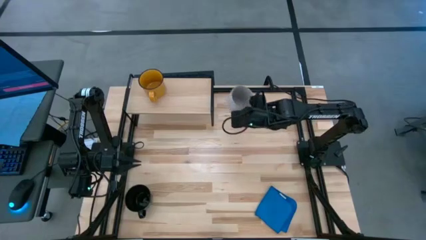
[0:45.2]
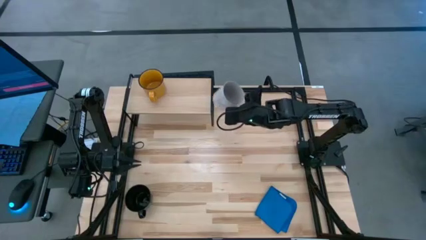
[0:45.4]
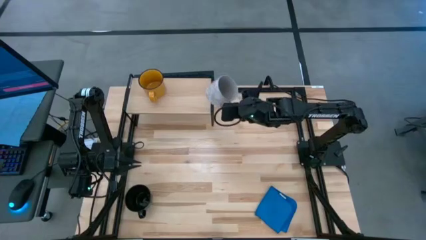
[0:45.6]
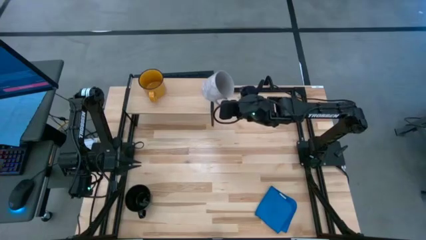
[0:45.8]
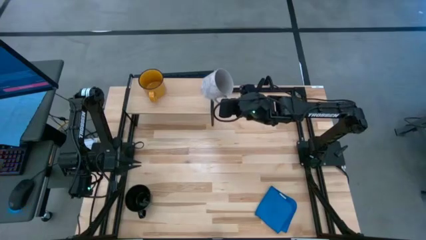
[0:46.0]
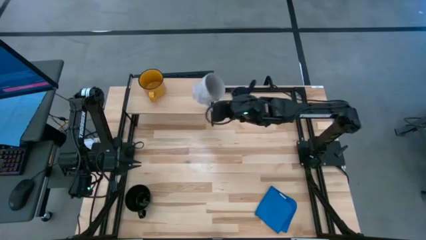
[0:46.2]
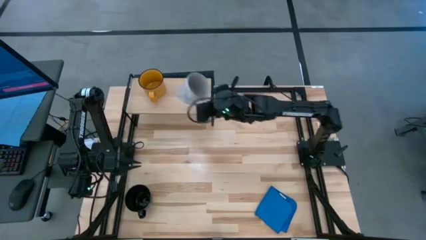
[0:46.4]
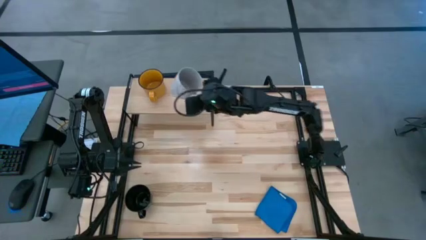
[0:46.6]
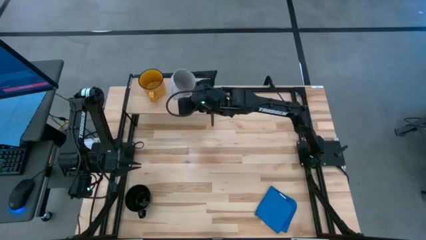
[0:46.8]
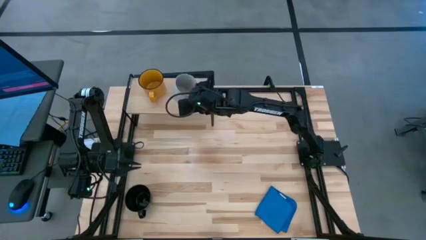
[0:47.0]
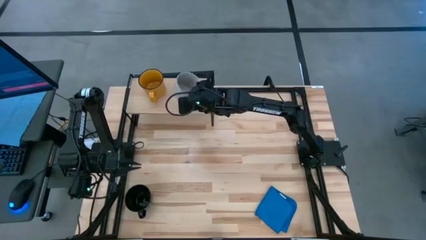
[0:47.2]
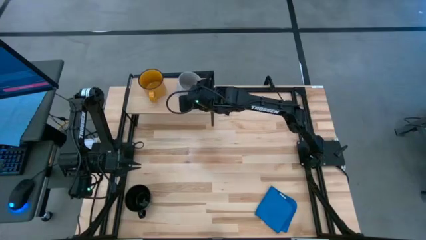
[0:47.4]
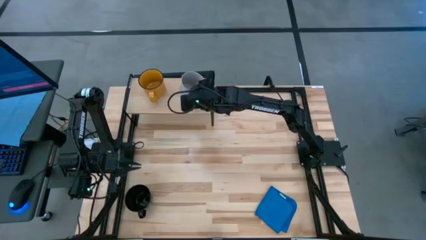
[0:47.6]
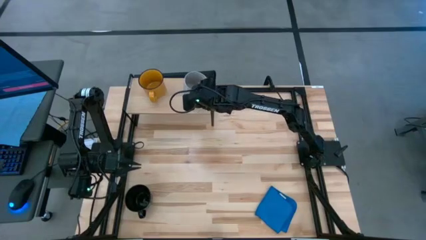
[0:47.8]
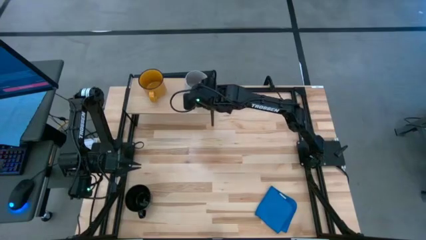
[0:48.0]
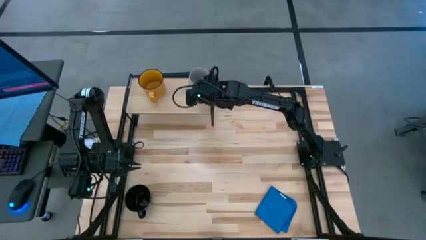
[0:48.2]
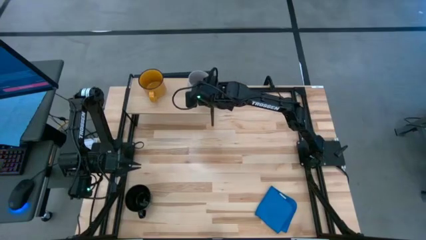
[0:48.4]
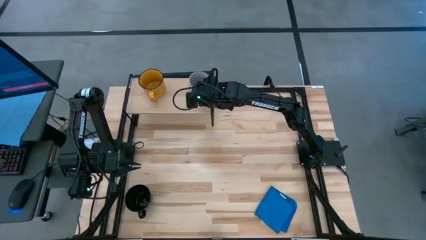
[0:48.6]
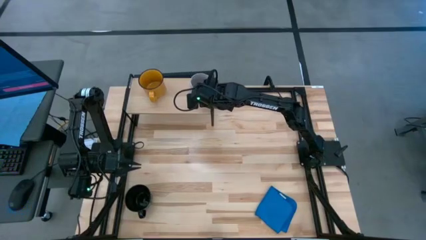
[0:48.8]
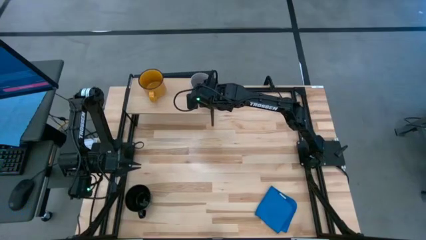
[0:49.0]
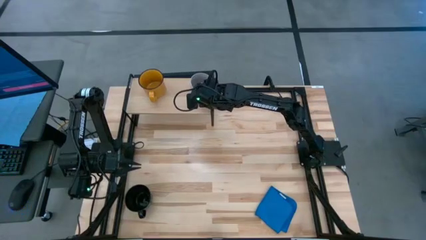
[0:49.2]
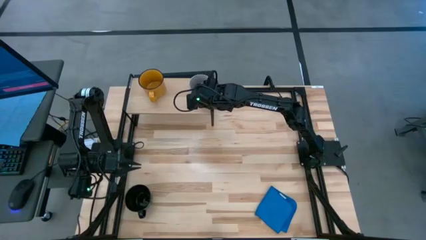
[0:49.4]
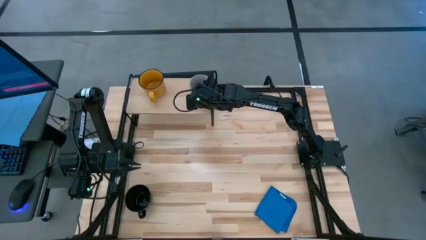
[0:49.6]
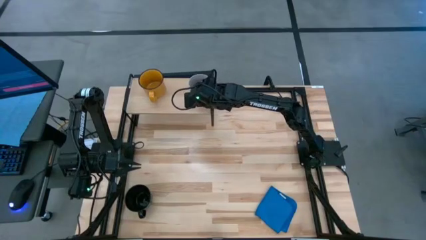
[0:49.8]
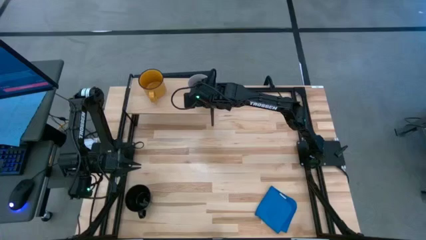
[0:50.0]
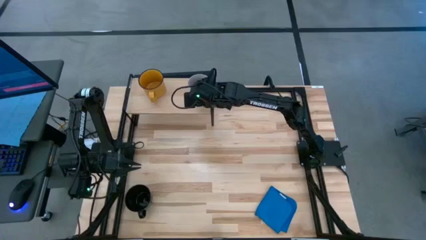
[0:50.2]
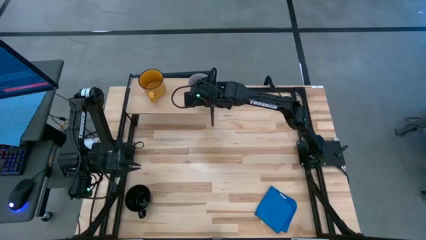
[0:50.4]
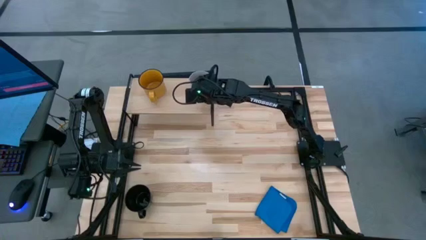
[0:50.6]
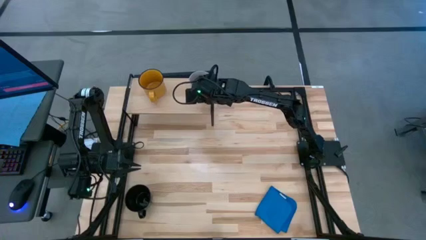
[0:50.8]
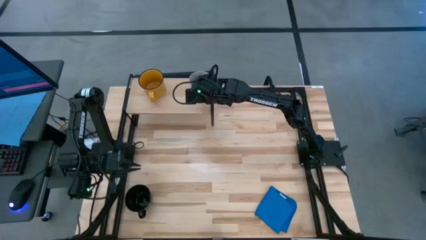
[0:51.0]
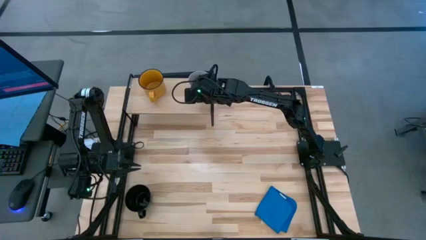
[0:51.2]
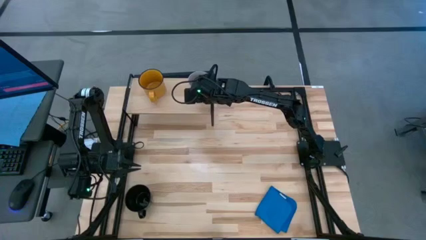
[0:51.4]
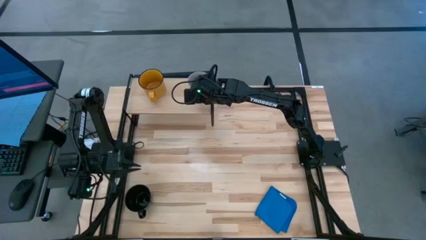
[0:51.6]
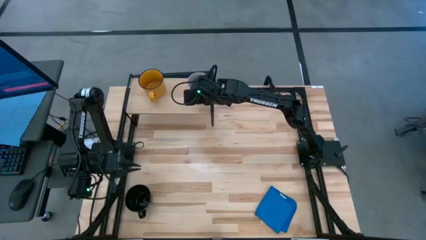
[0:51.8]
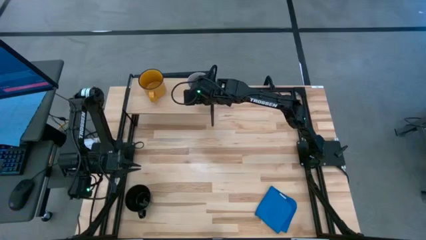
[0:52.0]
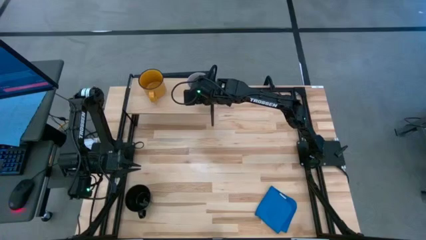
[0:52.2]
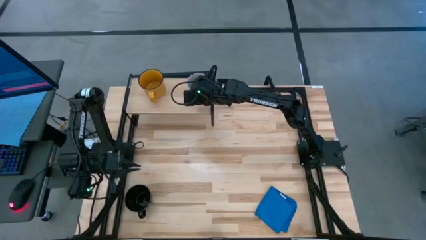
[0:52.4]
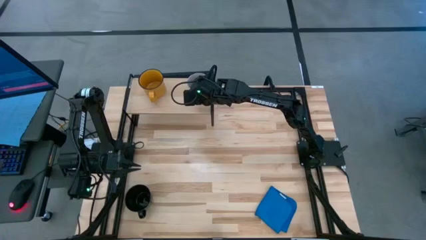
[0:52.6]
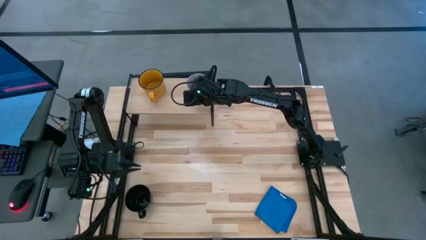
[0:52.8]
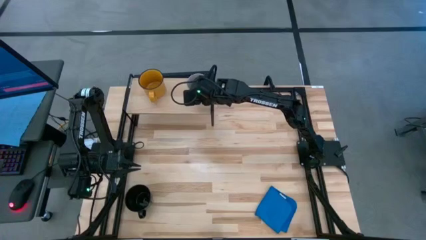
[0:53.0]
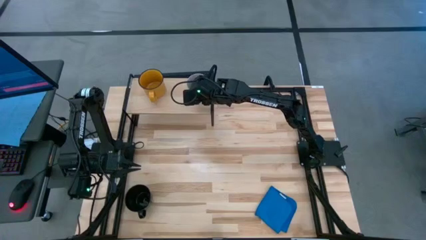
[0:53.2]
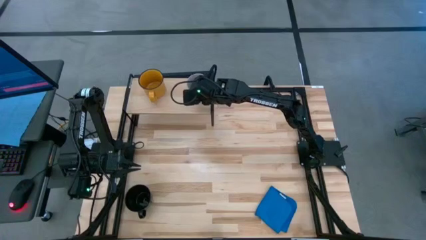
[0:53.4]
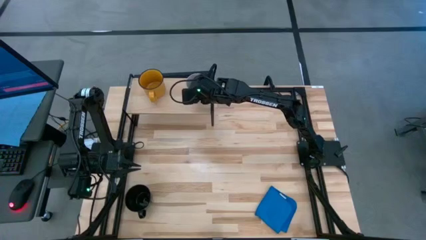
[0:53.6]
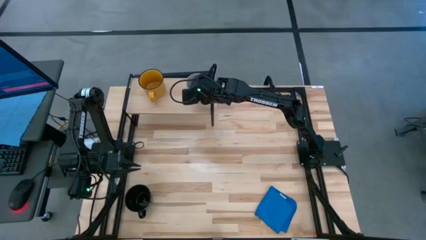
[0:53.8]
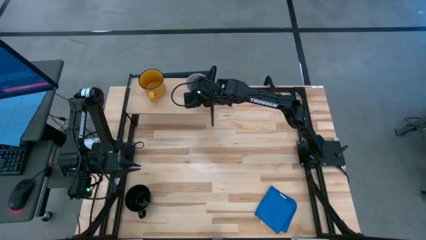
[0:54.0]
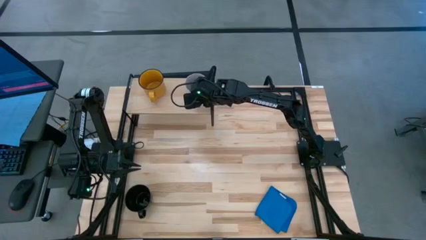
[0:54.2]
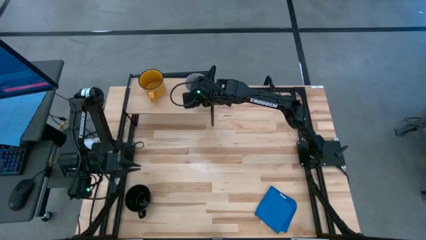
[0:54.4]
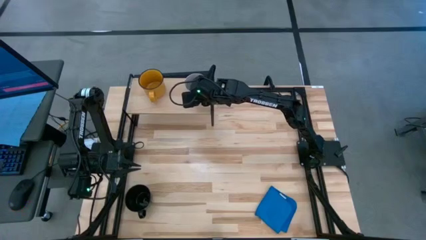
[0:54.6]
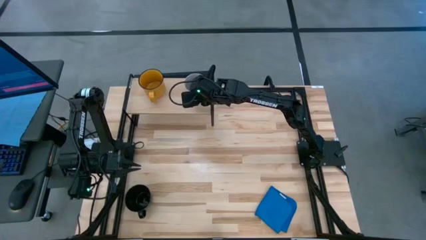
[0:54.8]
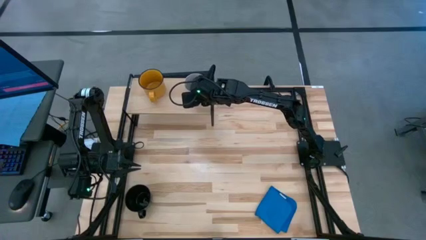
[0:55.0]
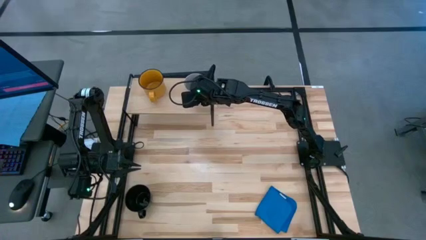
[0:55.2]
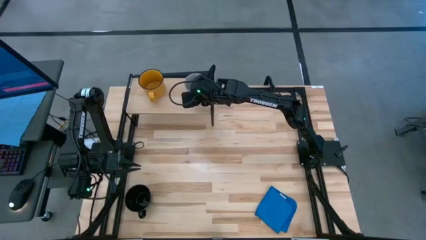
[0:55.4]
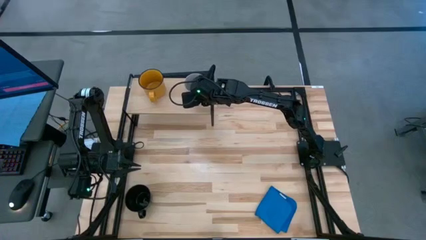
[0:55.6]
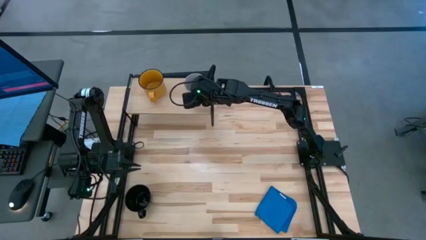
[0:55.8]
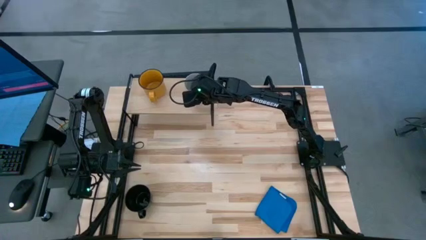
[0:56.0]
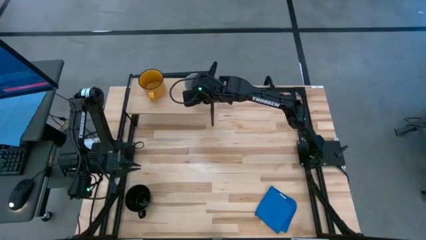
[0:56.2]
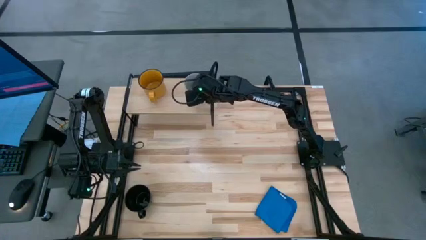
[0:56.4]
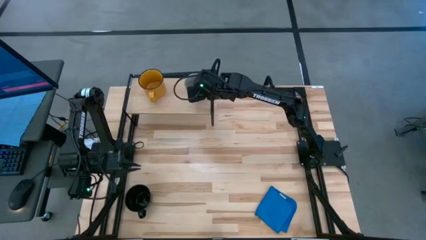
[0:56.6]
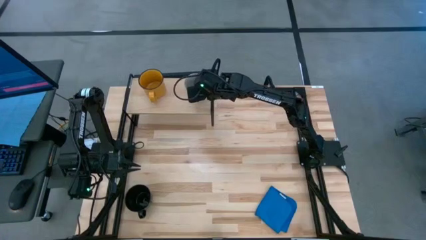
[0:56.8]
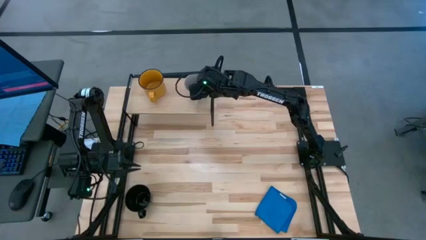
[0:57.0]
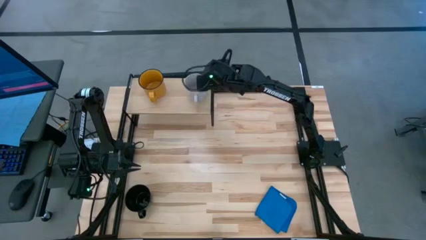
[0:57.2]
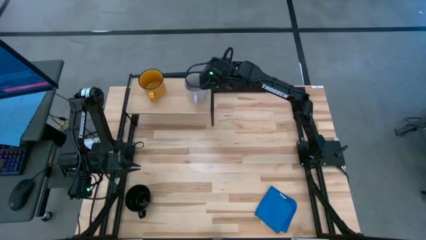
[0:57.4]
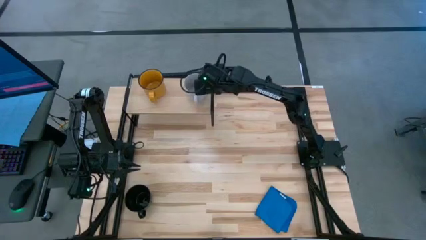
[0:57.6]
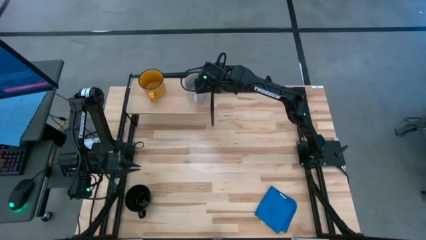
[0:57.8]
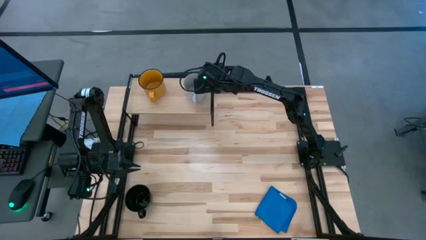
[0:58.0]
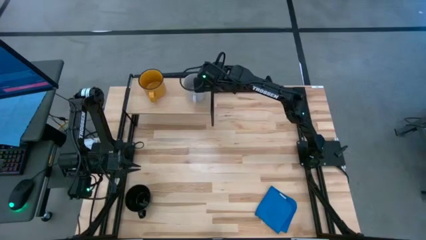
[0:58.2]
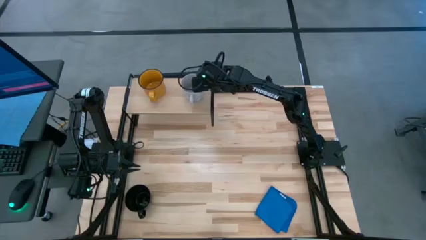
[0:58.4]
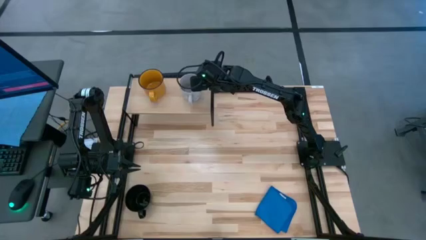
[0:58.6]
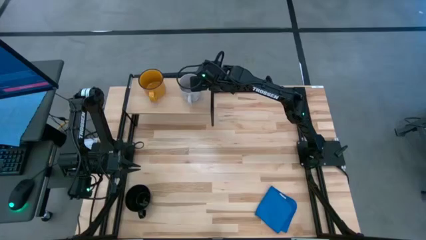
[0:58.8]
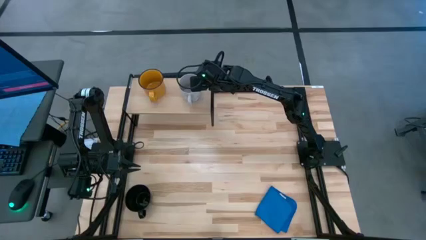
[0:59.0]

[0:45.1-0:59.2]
Task: Stack small to large cups/mugs on shelf
Put the gray mug on the shelf
